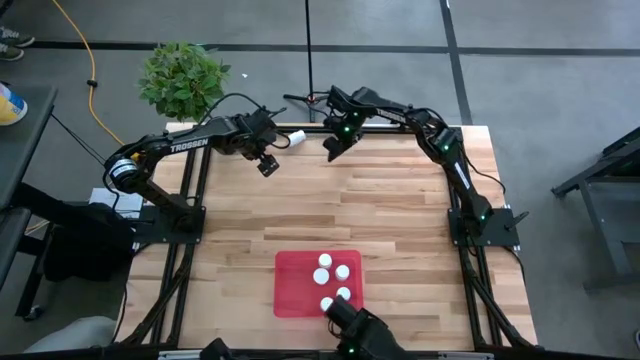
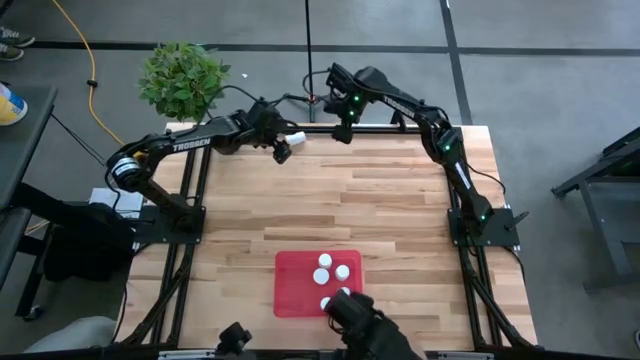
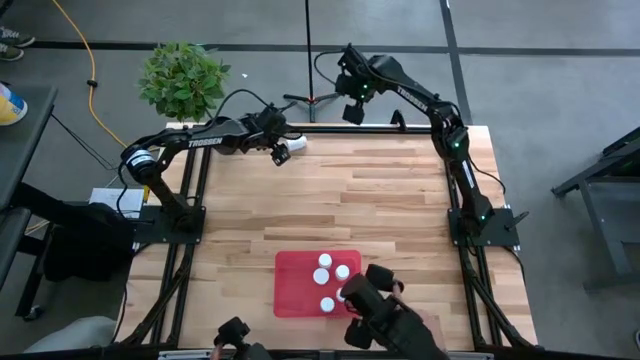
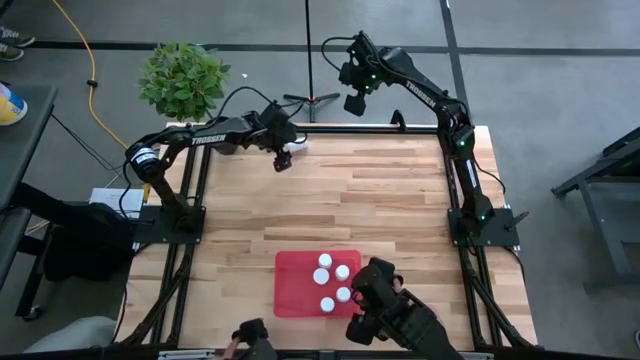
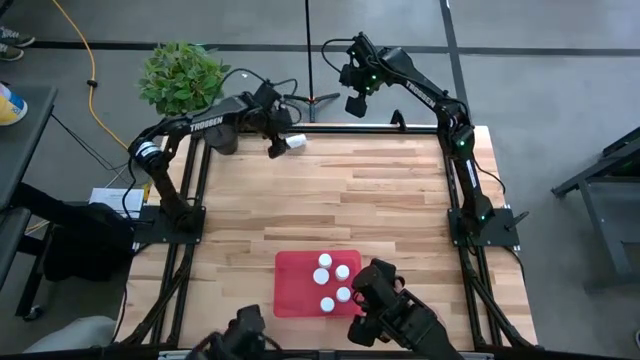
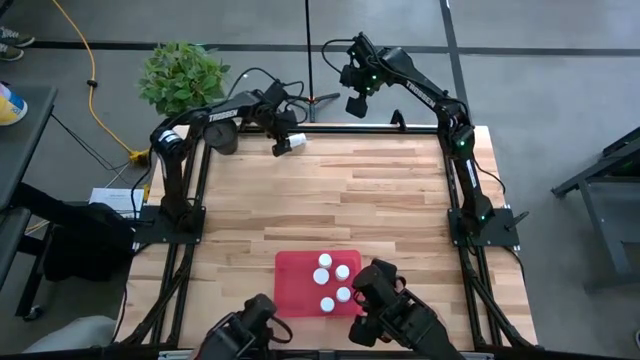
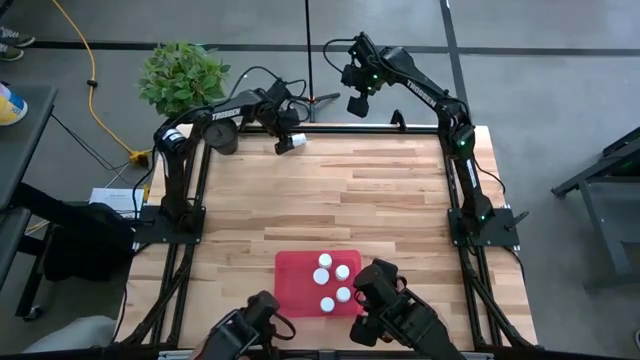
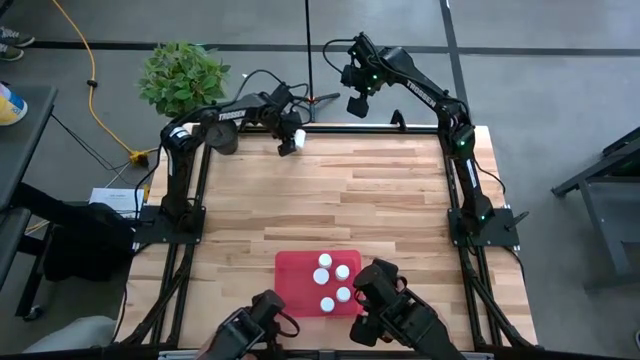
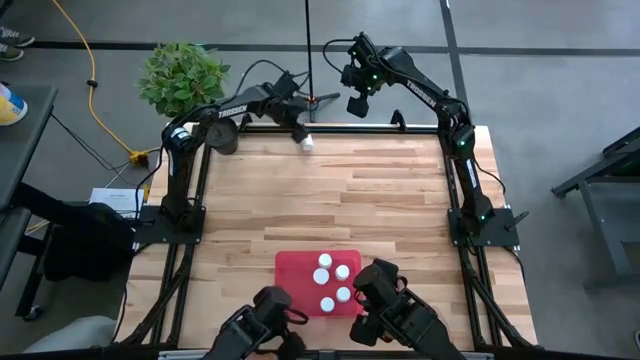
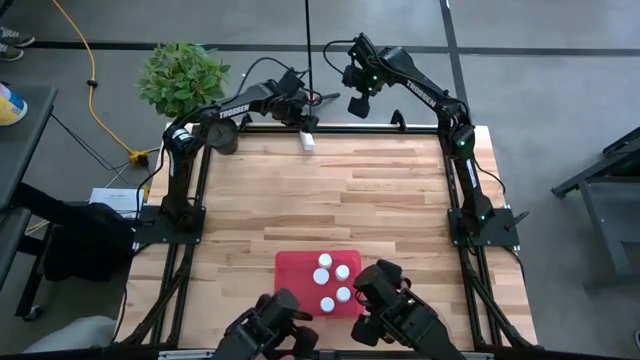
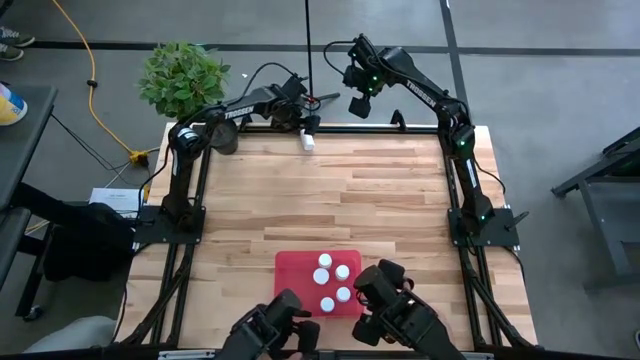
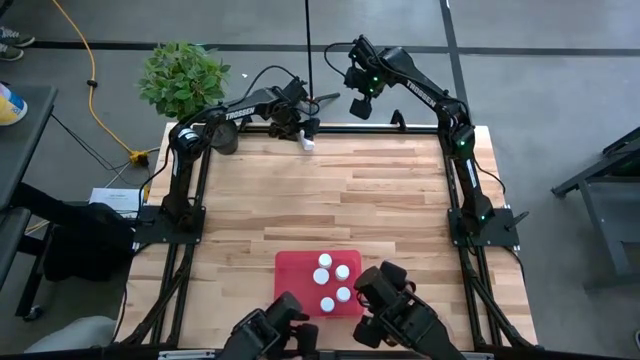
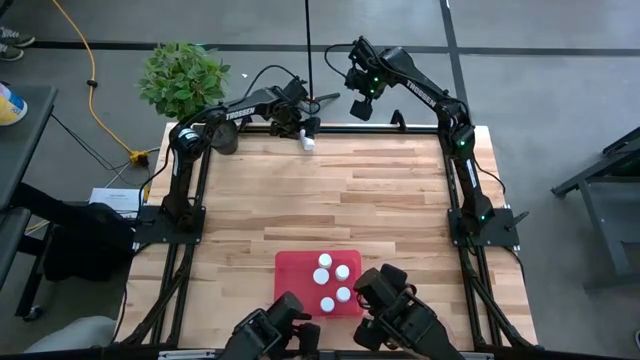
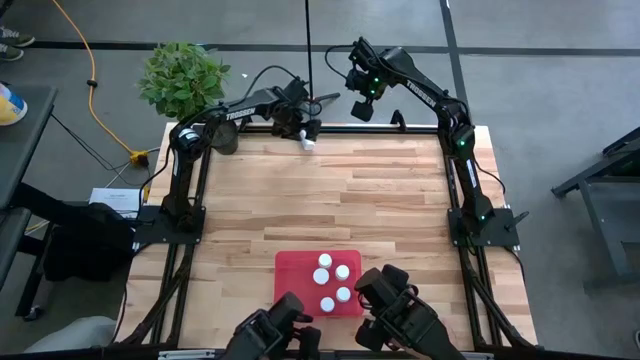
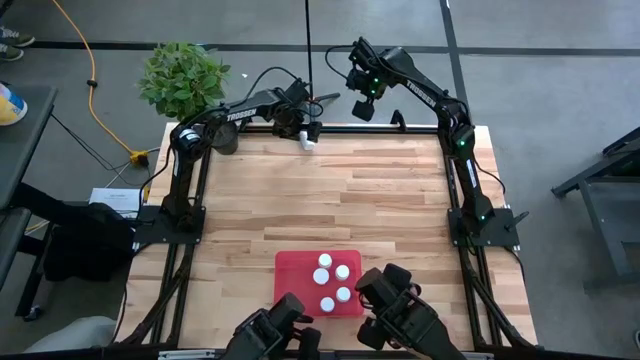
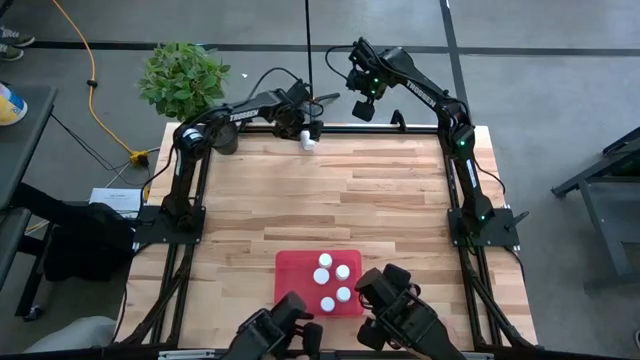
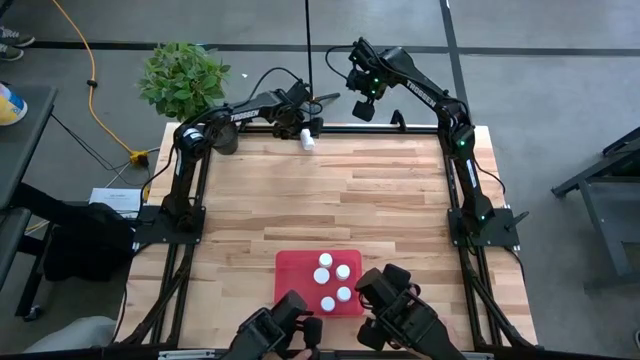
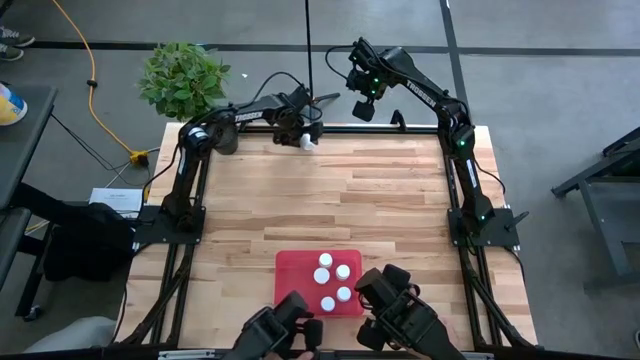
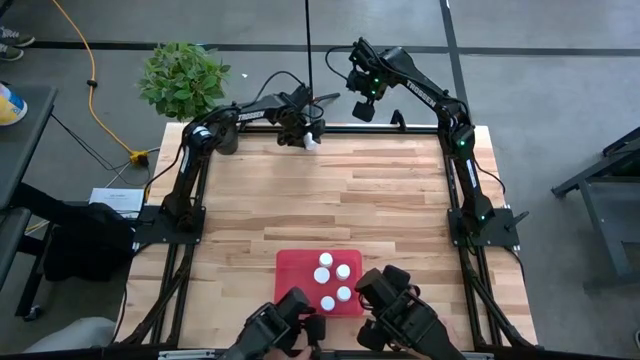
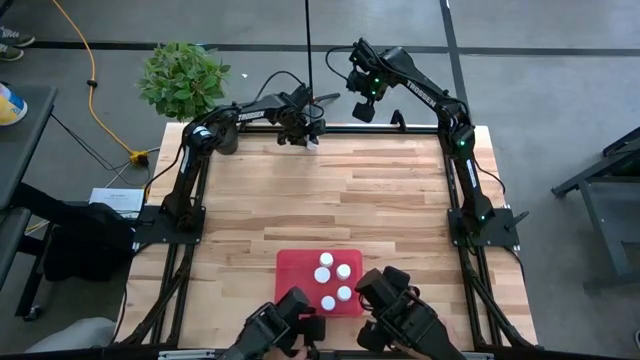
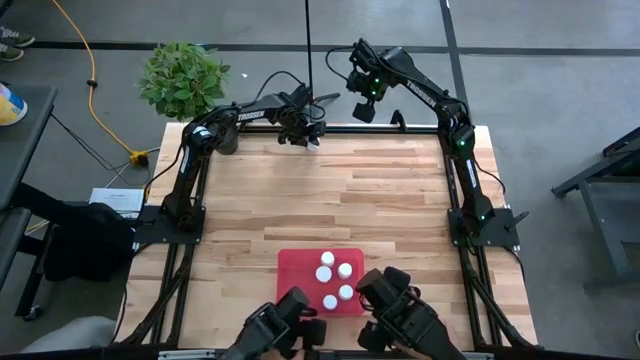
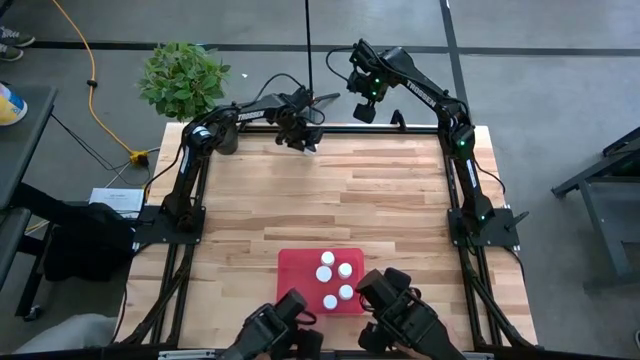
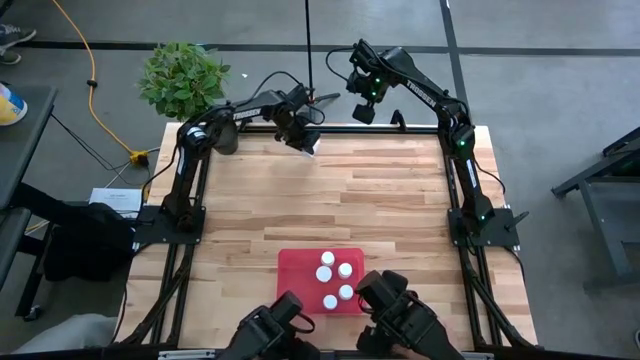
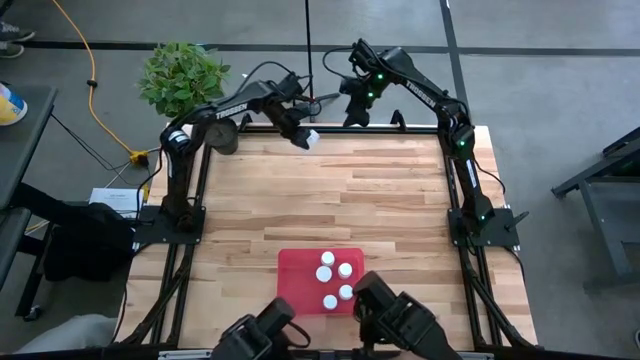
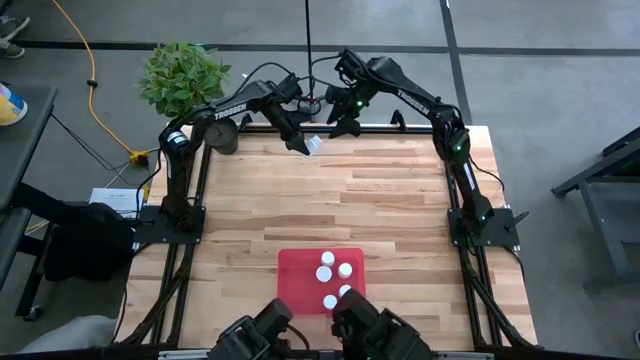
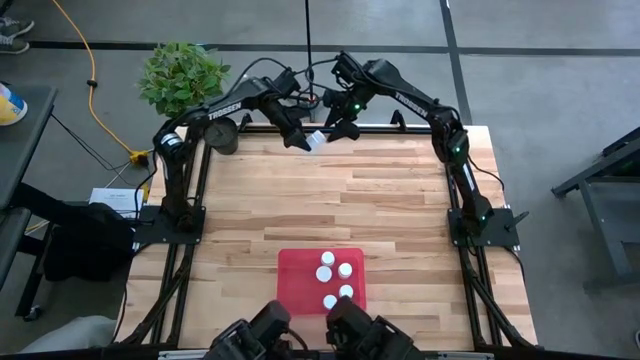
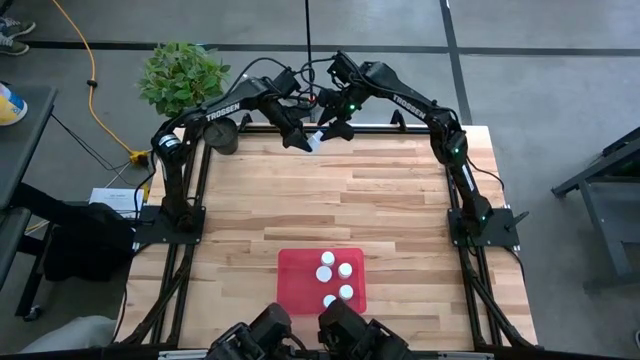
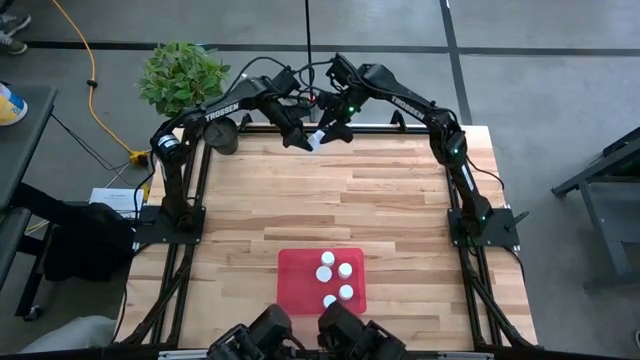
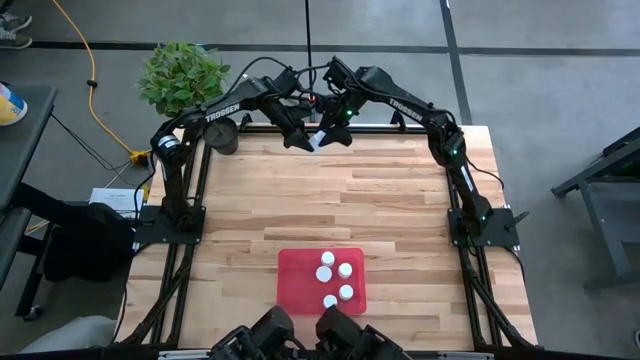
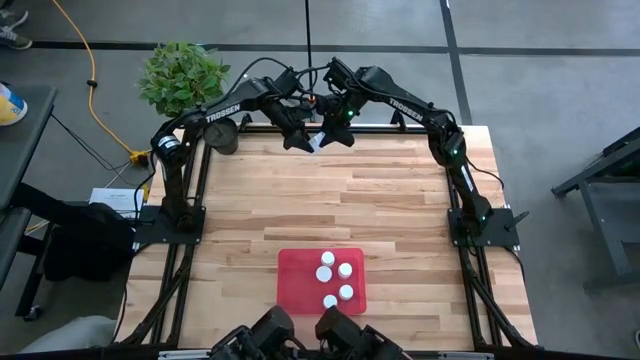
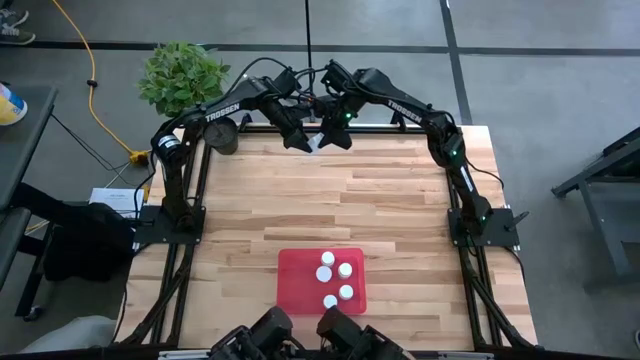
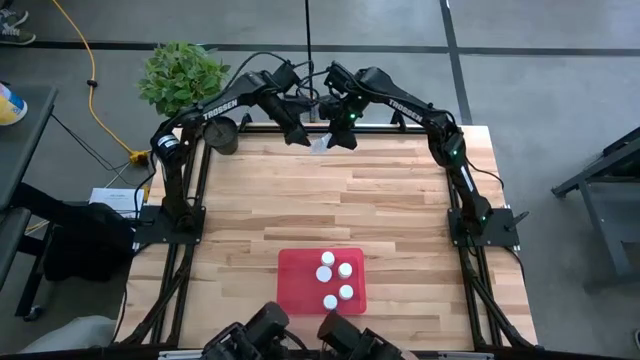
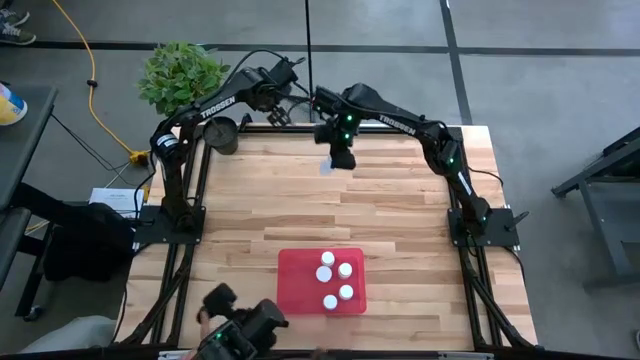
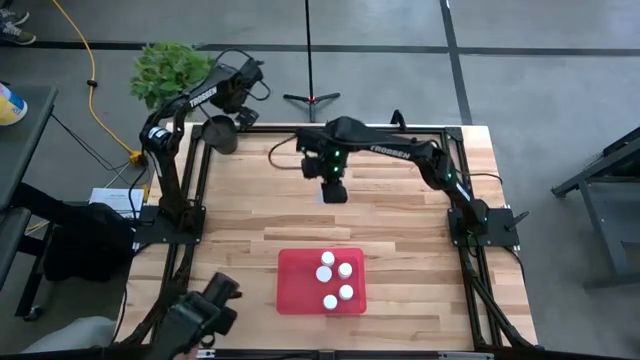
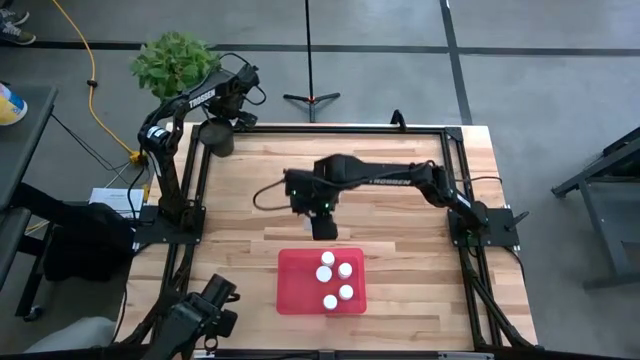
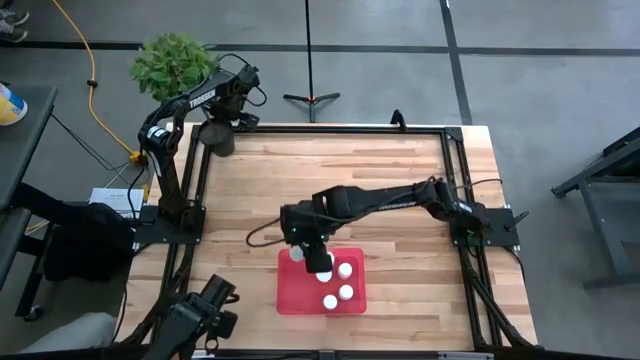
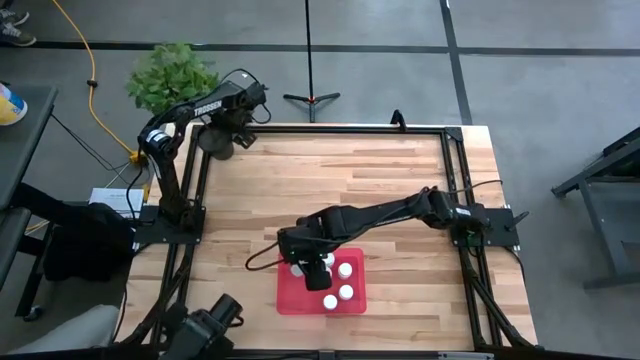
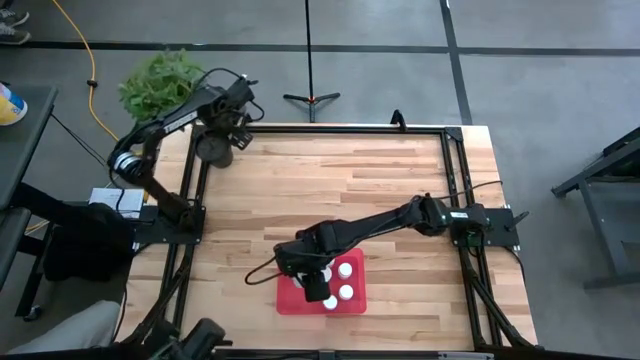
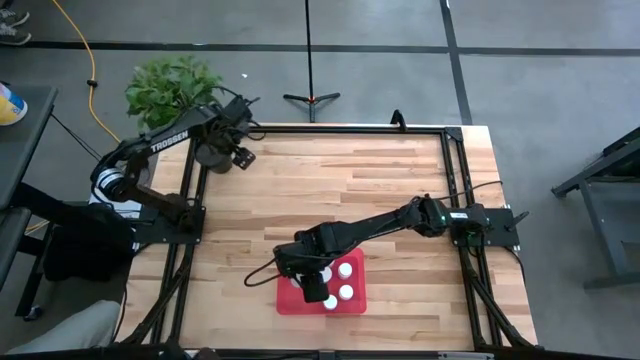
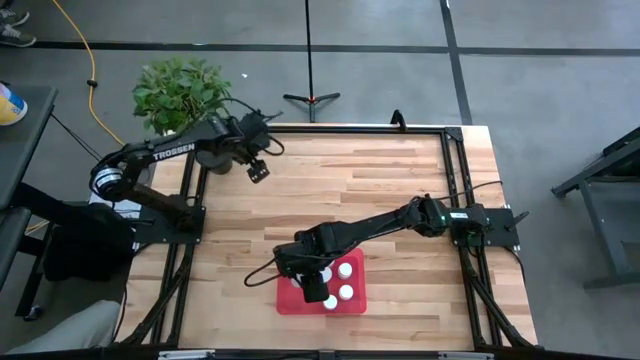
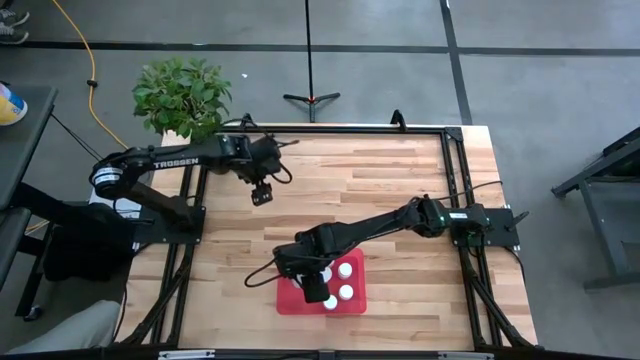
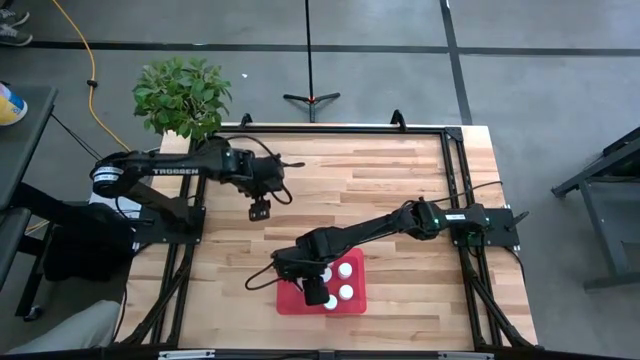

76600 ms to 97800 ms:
Task: Pick and place pill bottles into a basket
Put the white medicine bottle into the red bin
